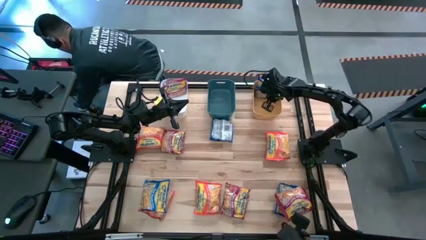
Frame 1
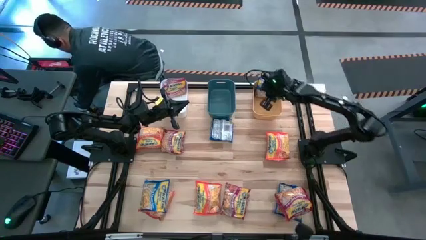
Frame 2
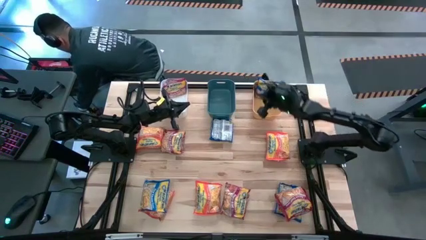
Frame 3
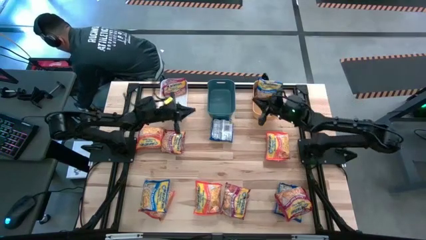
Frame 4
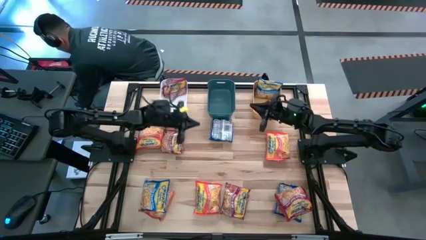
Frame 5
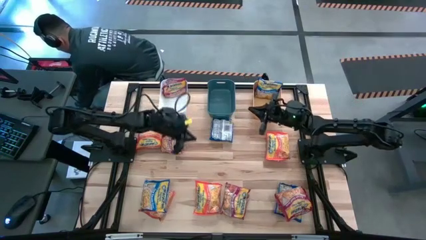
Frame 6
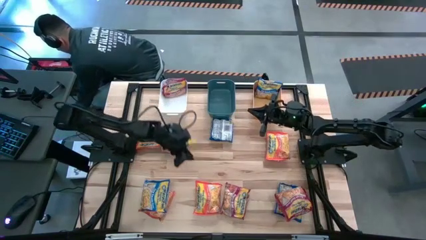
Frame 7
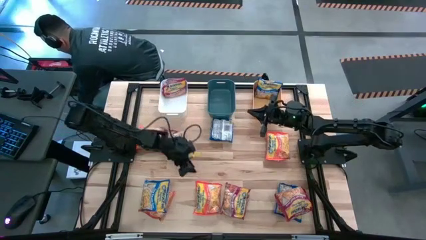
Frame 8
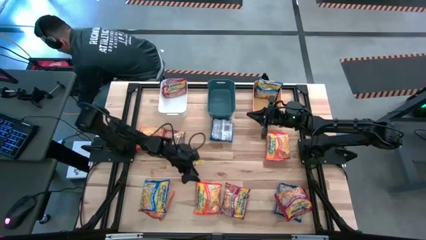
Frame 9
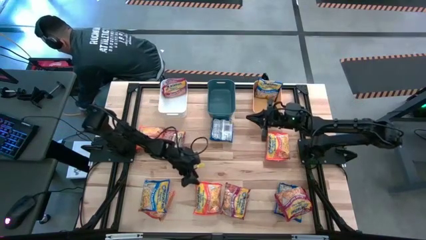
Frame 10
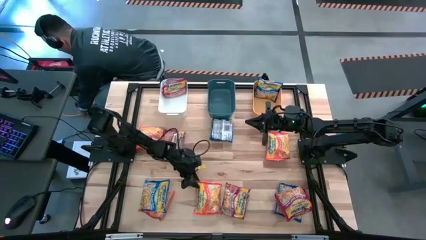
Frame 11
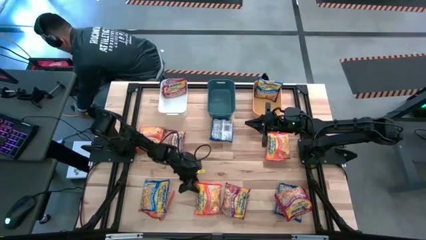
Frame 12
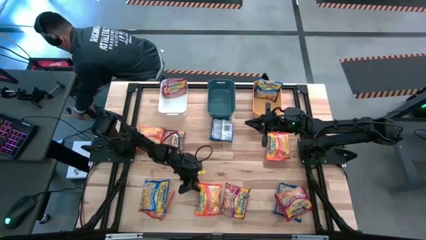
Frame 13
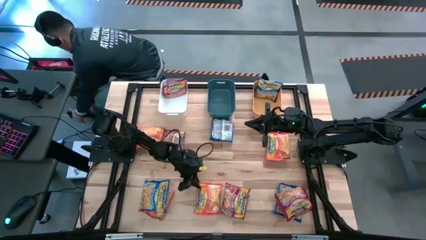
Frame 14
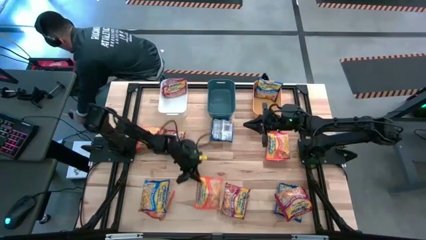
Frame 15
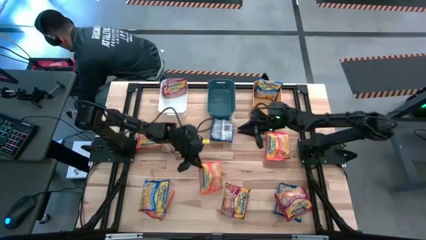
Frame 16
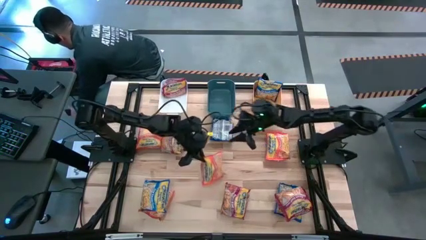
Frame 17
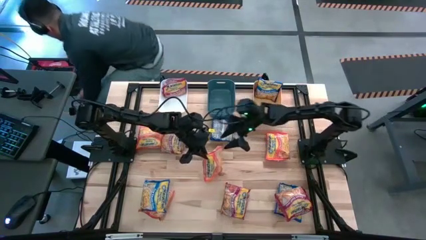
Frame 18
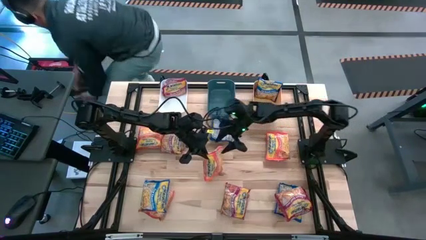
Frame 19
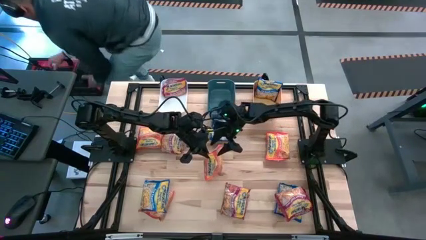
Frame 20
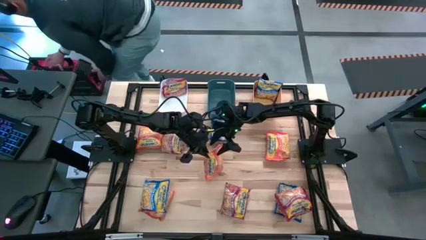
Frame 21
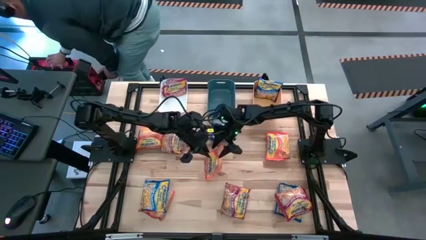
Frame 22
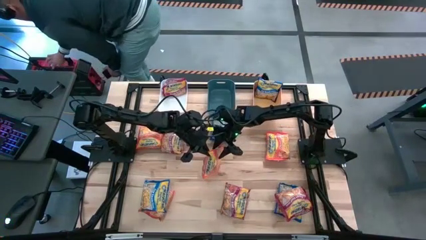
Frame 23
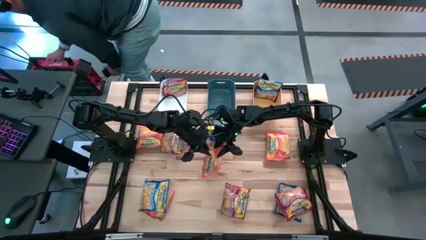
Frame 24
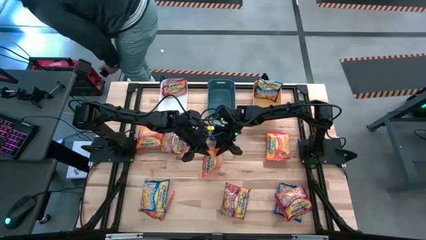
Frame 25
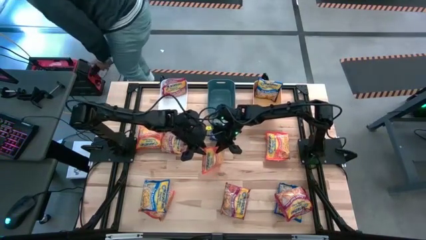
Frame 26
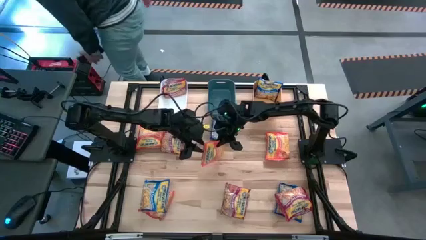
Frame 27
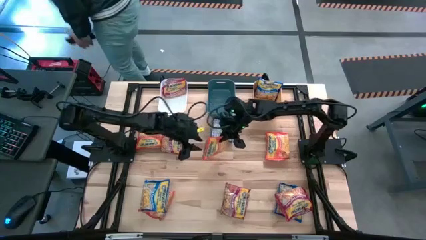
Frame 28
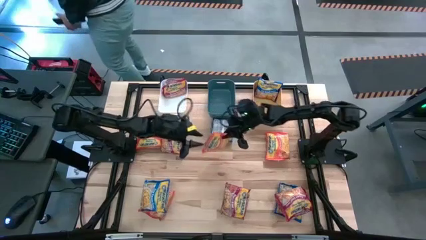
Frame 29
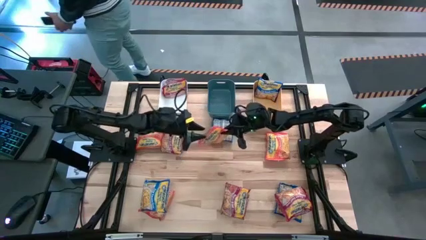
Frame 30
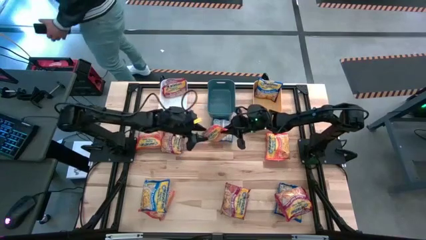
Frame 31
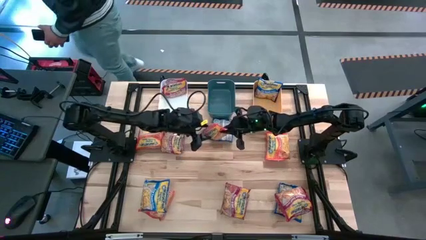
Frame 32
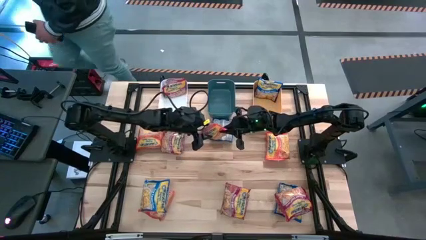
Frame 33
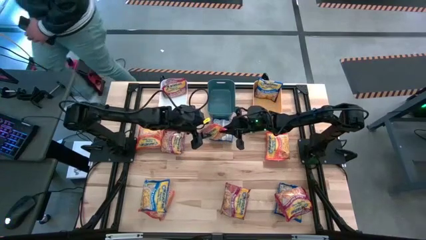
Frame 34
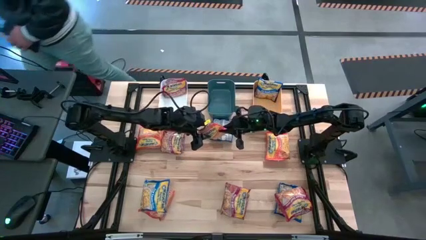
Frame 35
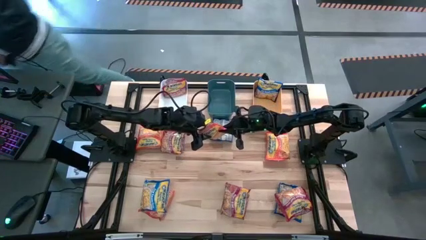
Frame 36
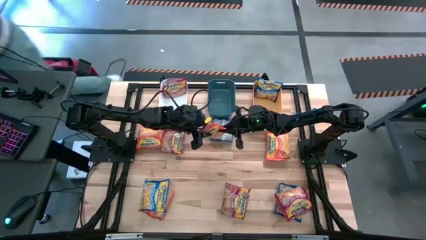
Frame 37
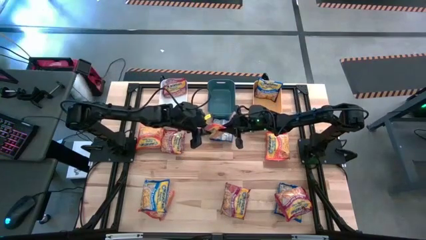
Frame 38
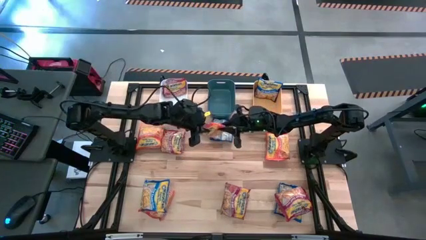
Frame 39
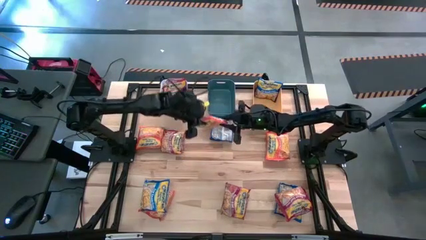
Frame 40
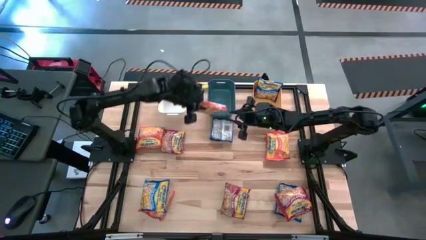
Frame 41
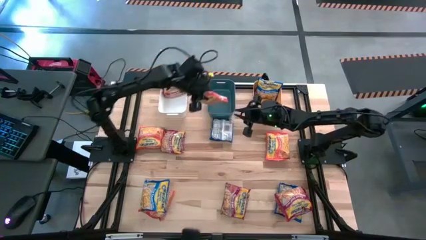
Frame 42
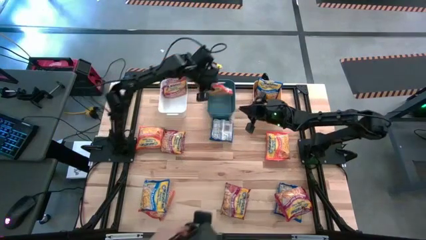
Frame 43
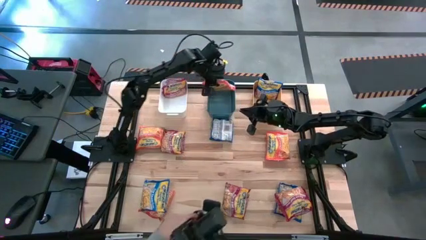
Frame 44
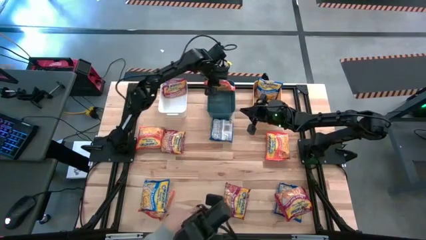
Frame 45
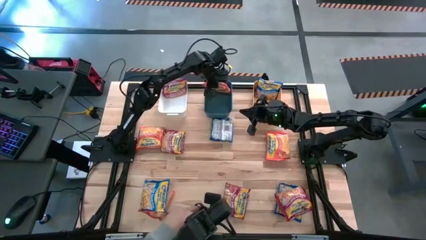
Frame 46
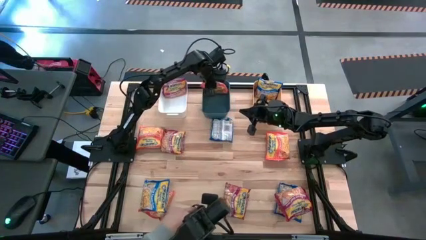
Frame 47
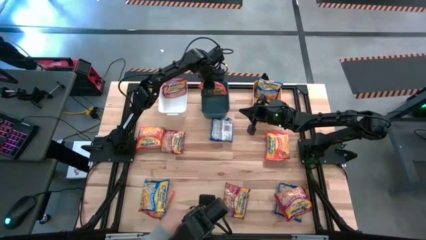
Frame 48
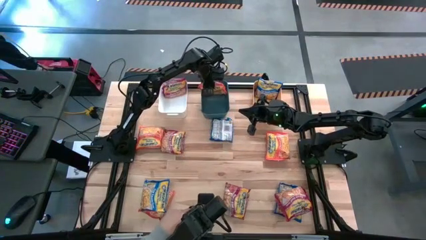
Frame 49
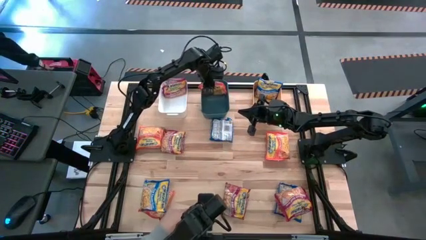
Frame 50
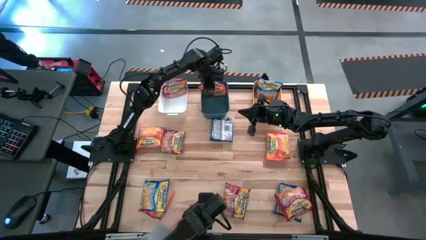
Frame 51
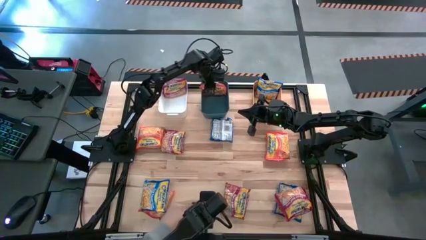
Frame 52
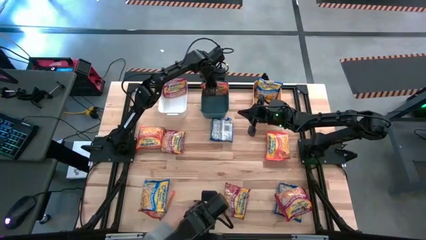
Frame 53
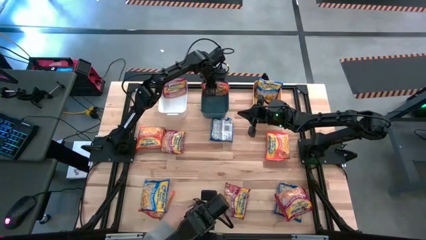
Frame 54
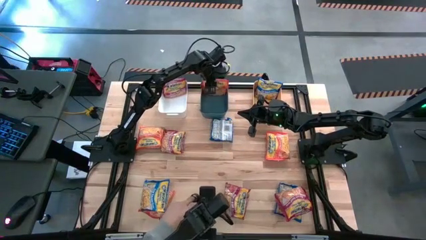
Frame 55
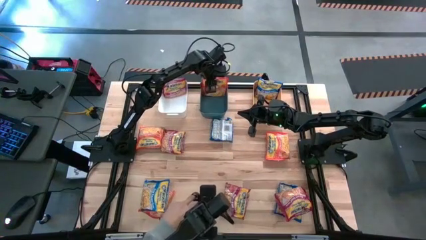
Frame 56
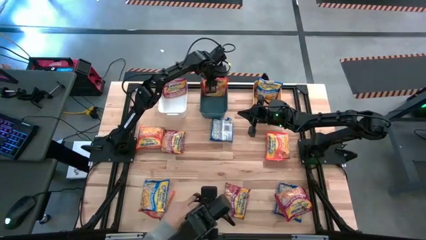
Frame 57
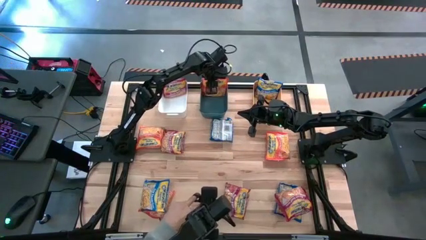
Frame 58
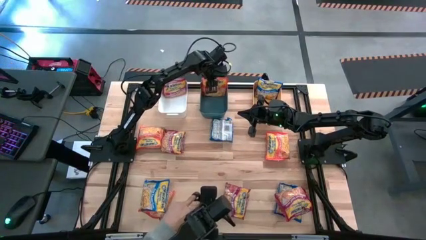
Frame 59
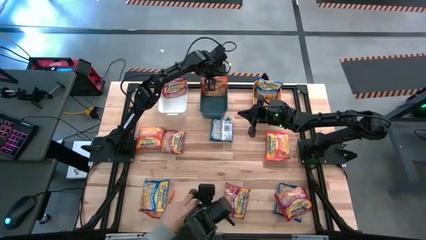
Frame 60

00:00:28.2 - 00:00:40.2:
Task: Sort Maruchan noodles
Put the orange noodle pack into the blue bin

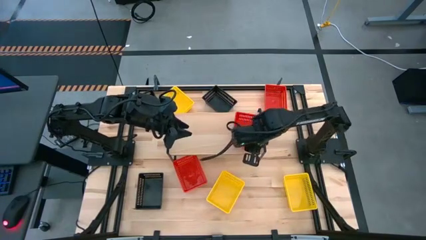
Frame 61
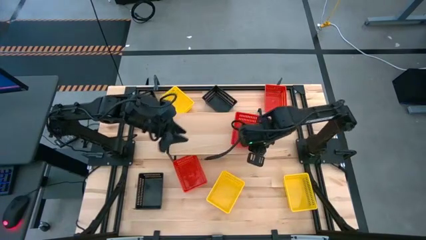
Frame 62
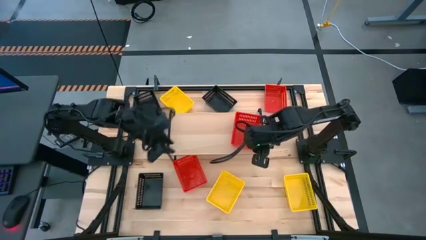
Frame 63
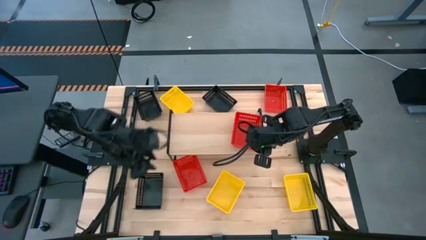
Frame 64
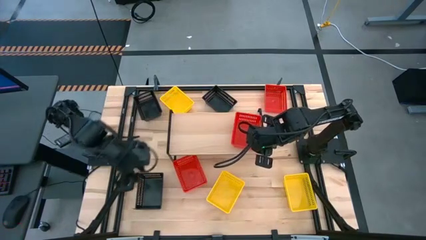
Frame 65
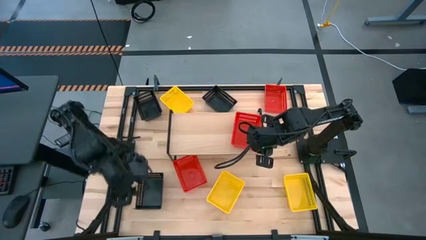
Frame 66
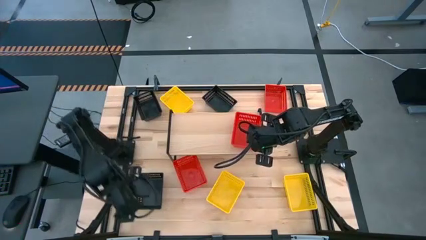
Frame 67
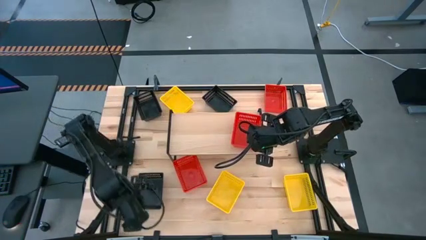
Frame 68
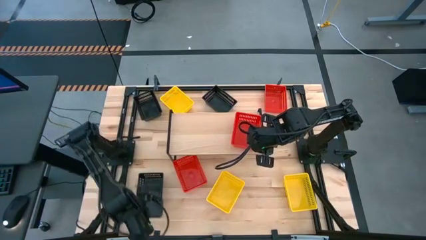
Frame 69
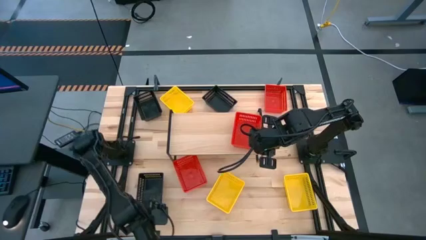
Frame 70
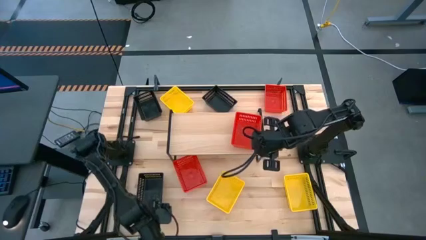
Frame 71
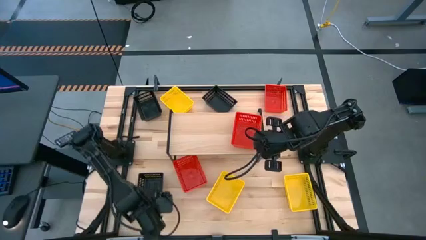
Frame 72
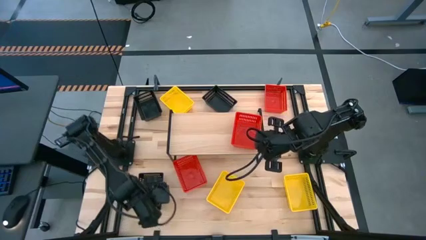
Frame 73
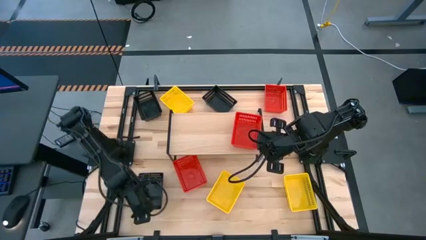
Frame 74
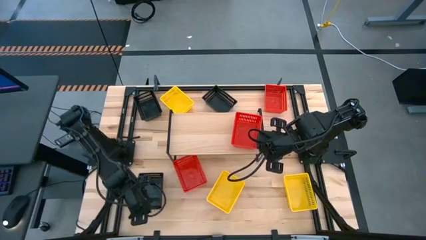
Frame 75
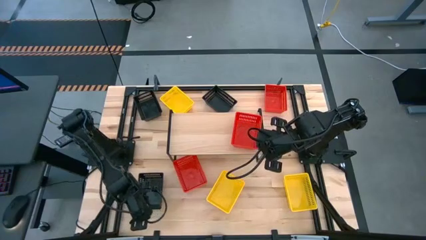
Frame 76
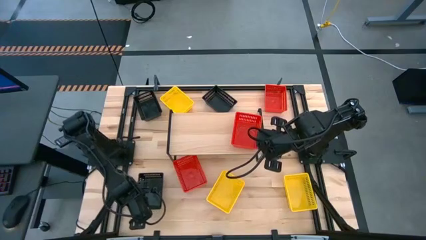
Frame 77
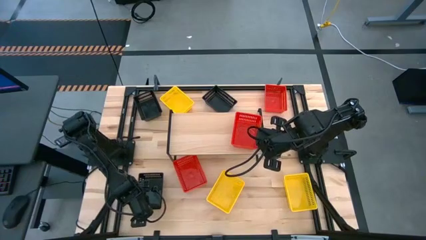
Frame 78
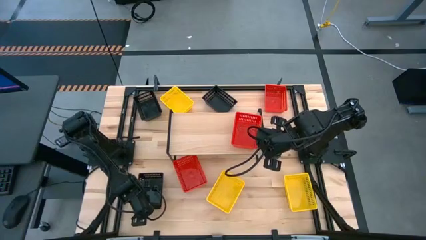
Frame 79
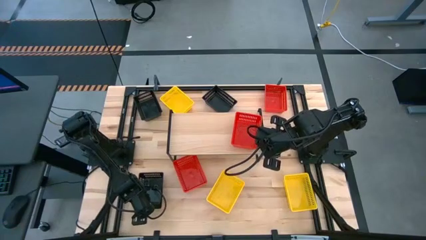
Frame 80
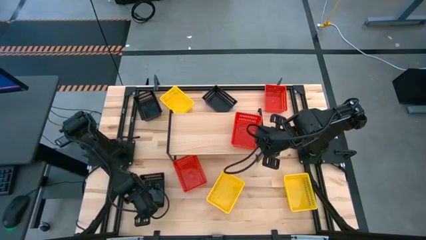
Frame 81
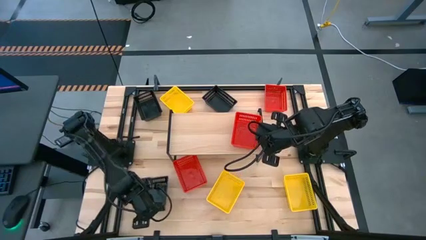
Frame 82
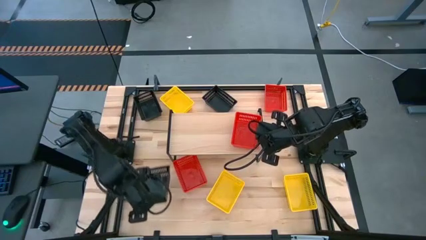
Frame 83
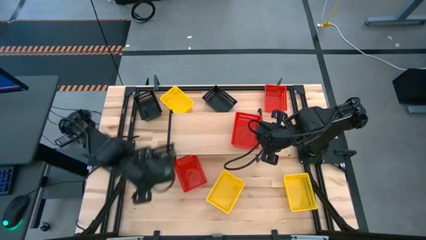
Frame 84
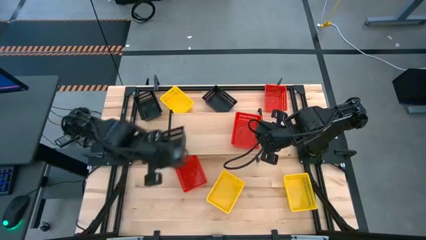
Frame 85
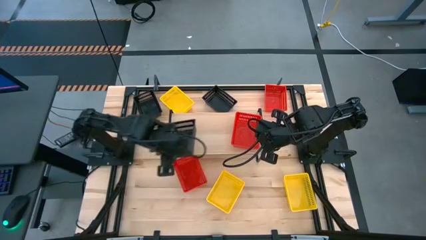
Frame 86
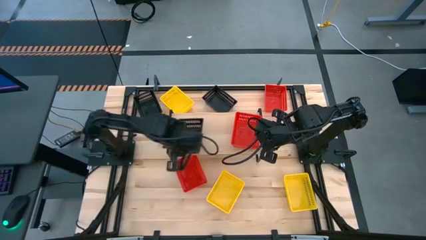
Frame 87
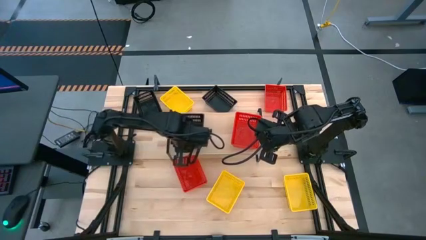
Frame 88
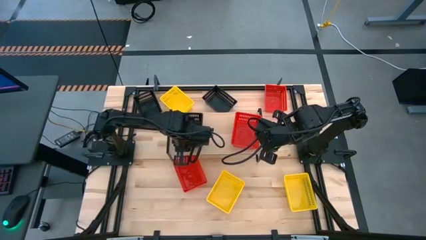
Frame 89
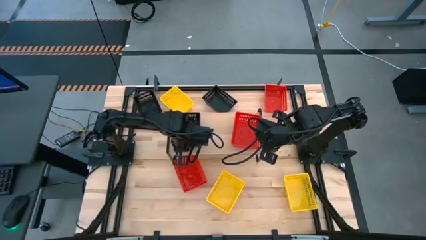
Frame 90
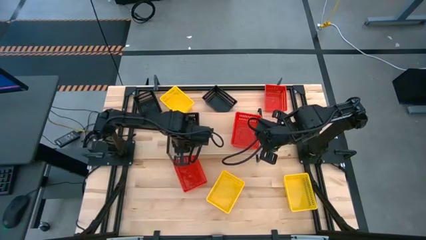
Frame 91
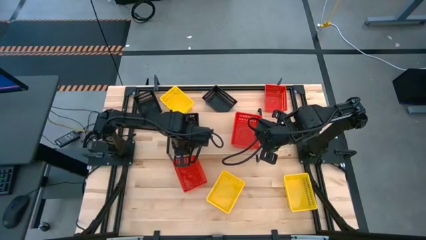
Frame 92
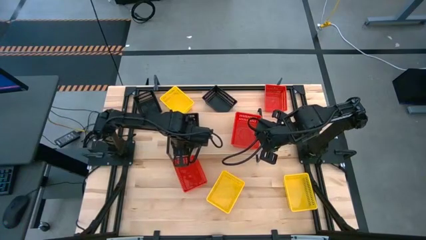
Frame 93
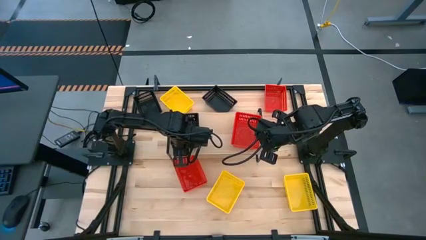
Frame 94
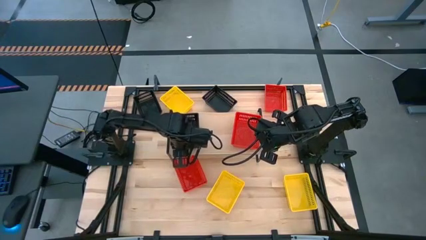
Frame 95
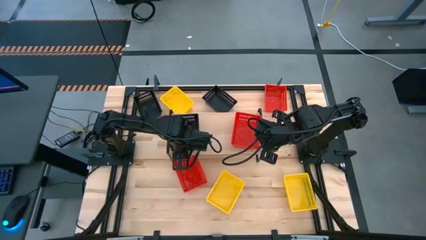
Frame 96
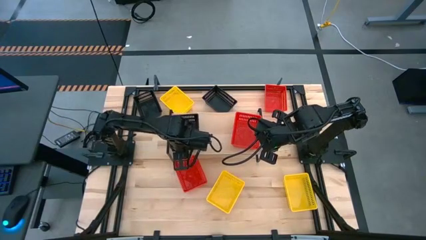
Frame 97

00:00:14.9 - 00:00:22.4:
Task: Stack baskets on shelf by color
Put the bottom black basket on the shelf
